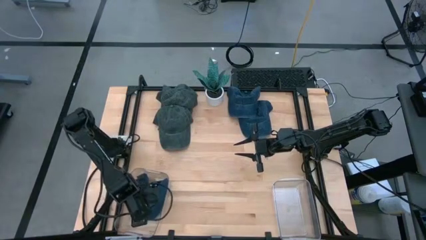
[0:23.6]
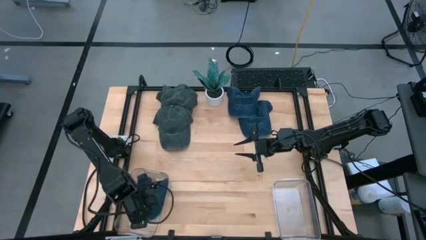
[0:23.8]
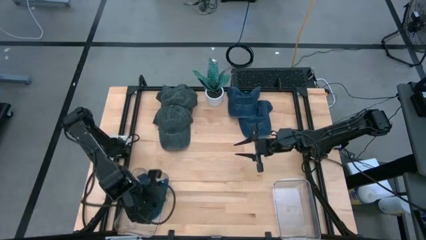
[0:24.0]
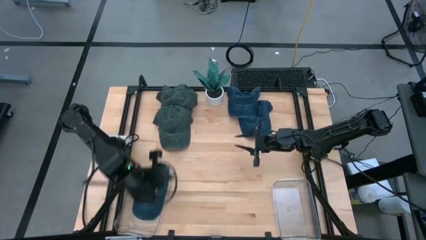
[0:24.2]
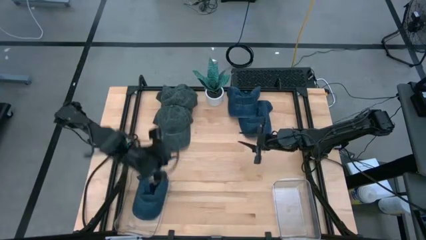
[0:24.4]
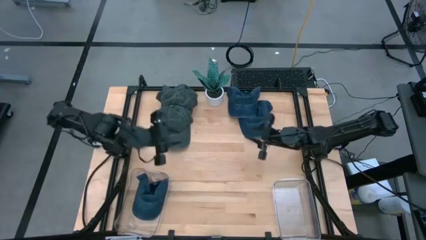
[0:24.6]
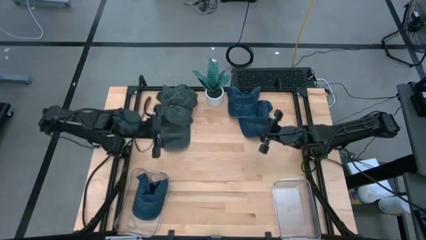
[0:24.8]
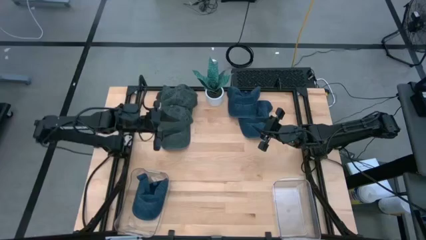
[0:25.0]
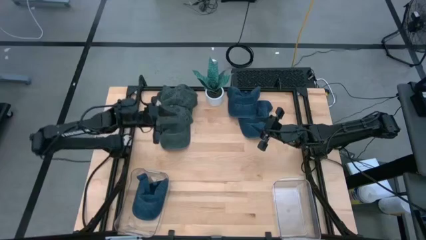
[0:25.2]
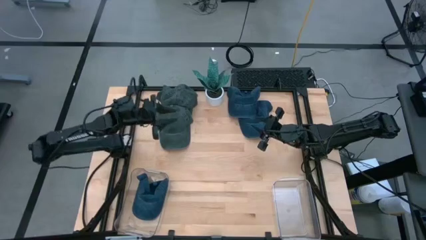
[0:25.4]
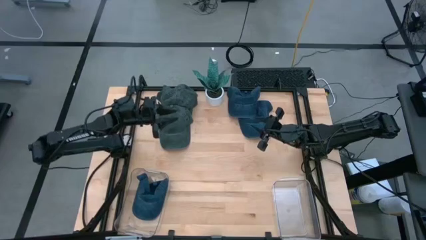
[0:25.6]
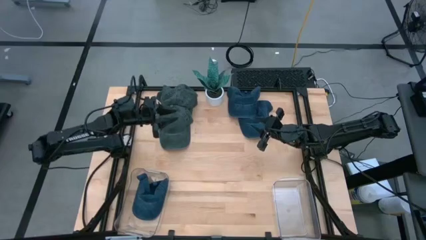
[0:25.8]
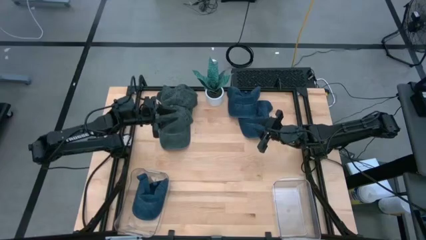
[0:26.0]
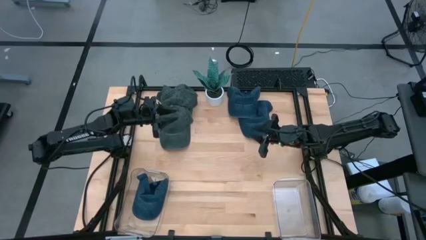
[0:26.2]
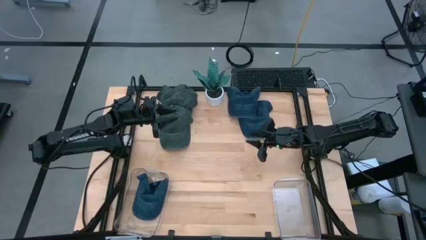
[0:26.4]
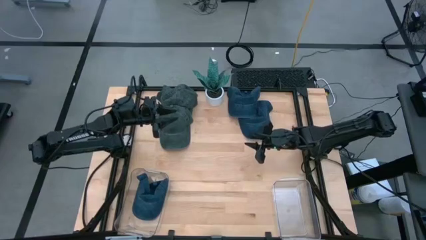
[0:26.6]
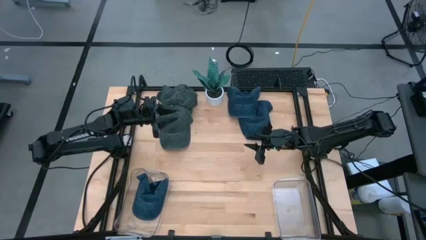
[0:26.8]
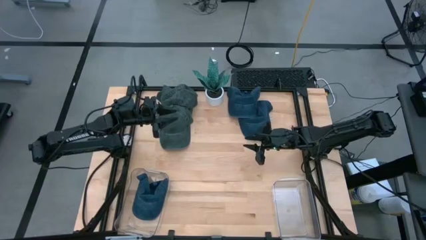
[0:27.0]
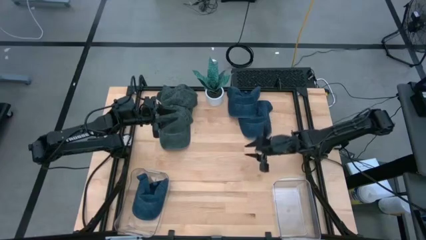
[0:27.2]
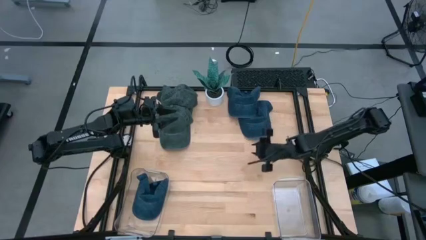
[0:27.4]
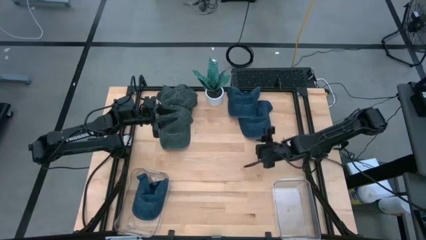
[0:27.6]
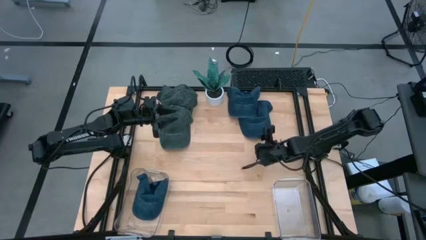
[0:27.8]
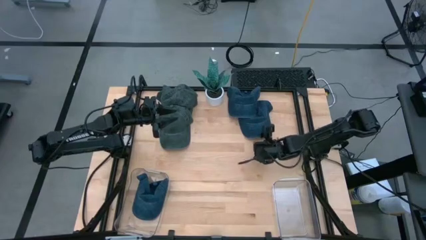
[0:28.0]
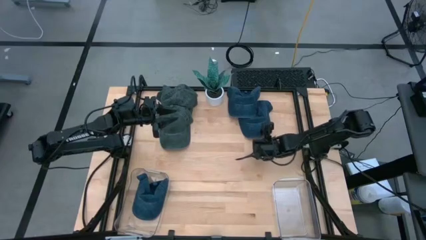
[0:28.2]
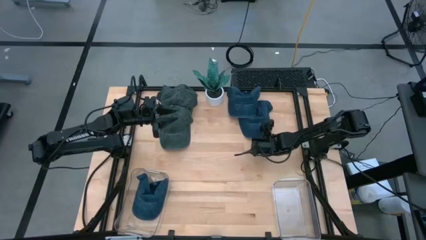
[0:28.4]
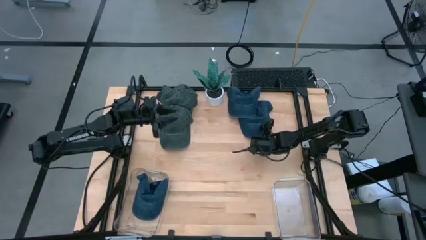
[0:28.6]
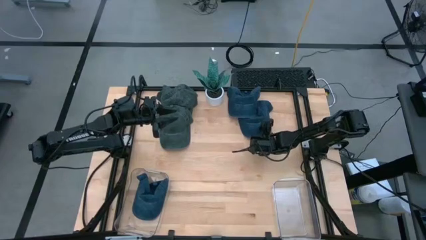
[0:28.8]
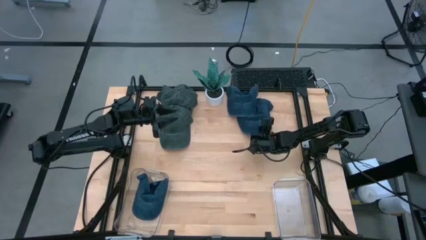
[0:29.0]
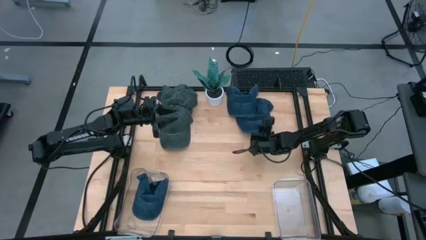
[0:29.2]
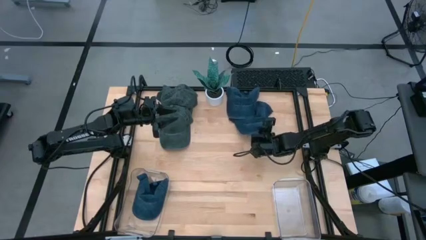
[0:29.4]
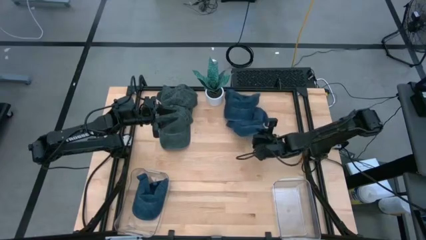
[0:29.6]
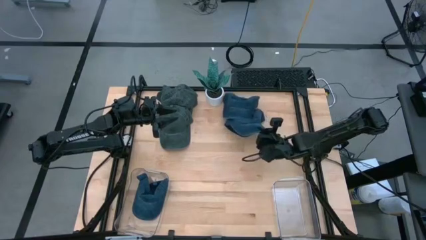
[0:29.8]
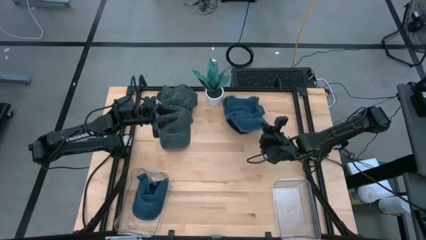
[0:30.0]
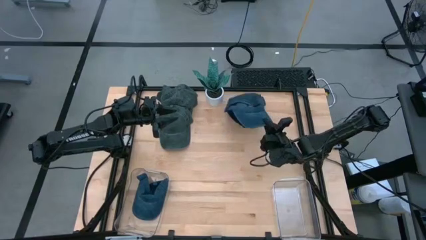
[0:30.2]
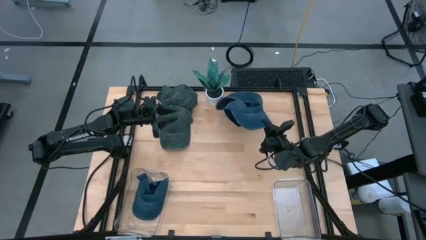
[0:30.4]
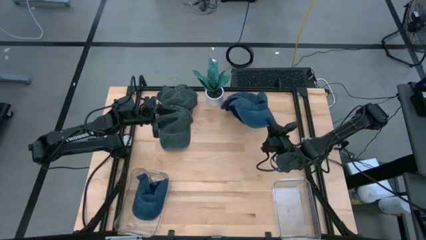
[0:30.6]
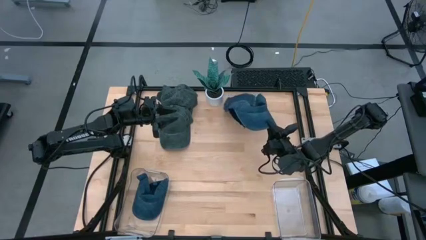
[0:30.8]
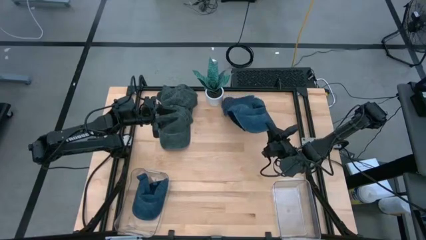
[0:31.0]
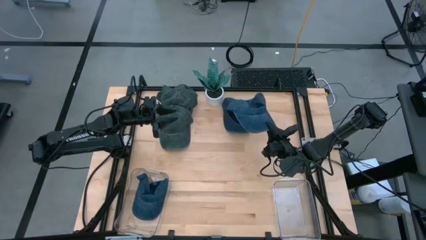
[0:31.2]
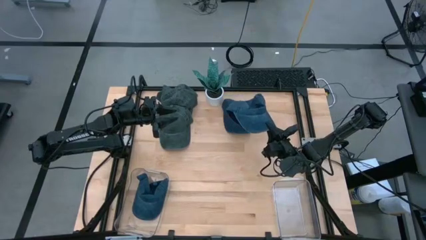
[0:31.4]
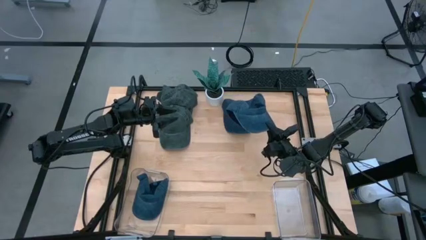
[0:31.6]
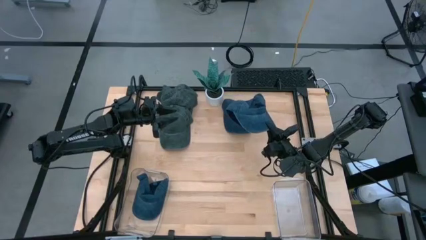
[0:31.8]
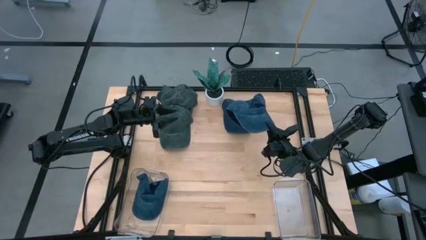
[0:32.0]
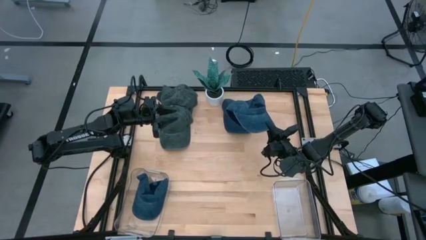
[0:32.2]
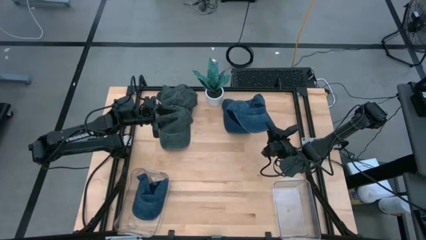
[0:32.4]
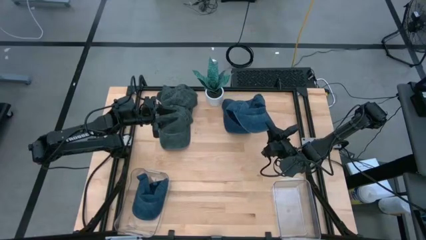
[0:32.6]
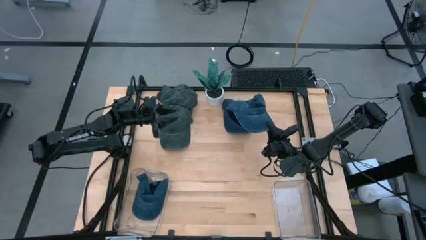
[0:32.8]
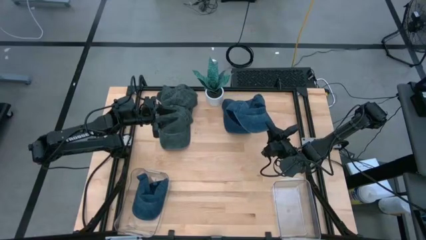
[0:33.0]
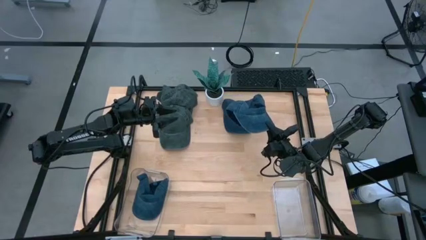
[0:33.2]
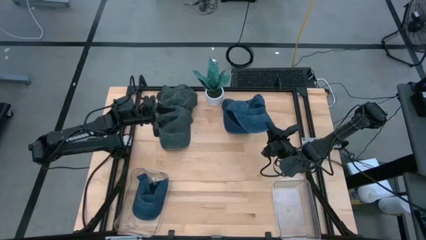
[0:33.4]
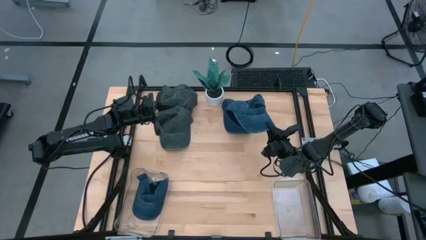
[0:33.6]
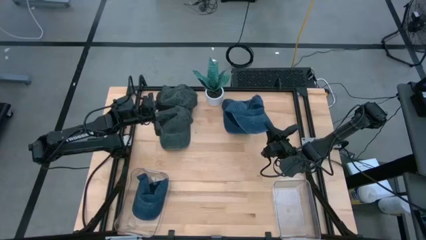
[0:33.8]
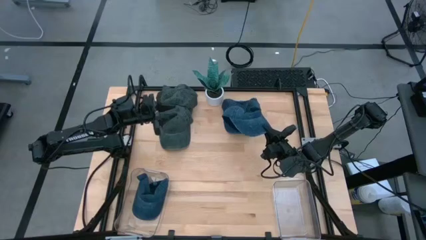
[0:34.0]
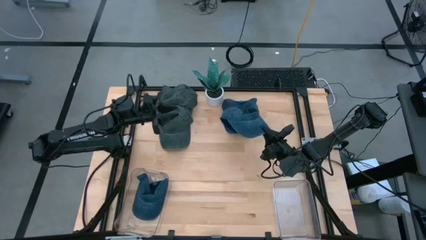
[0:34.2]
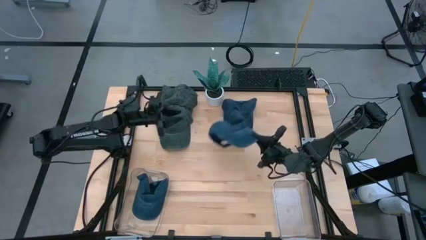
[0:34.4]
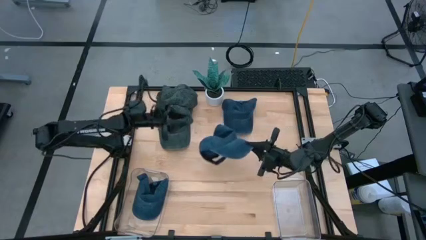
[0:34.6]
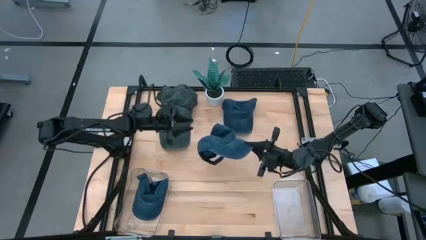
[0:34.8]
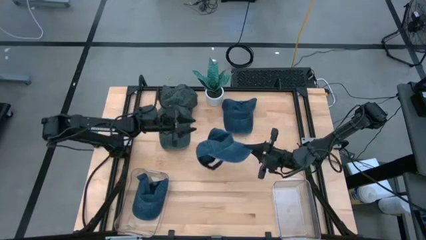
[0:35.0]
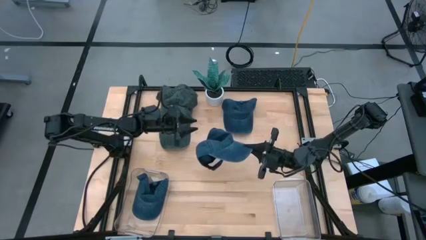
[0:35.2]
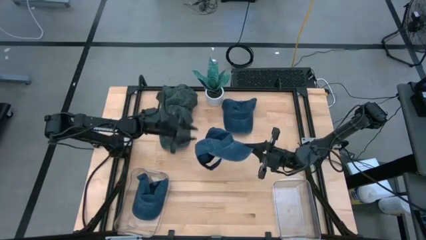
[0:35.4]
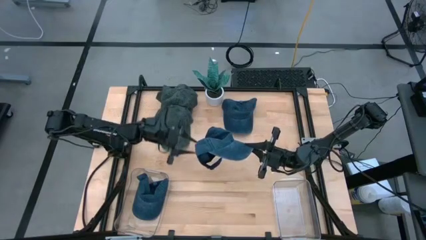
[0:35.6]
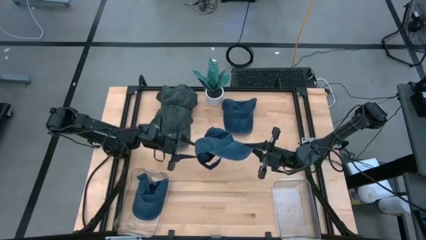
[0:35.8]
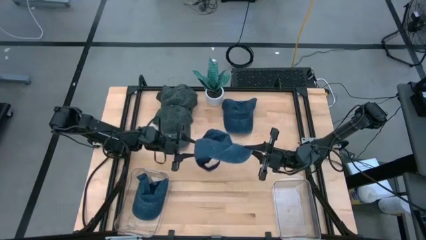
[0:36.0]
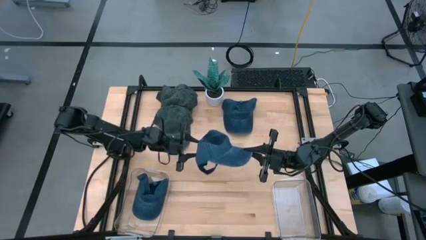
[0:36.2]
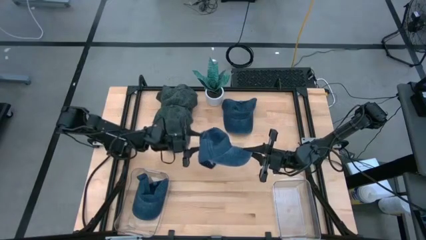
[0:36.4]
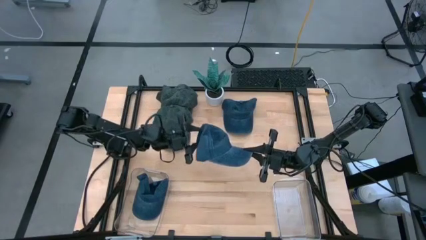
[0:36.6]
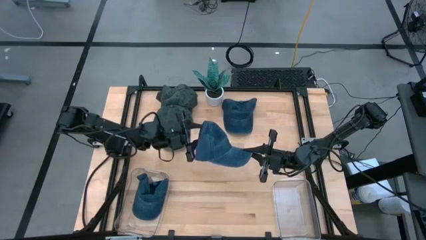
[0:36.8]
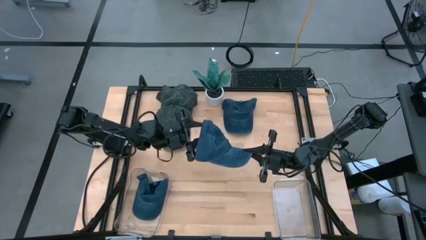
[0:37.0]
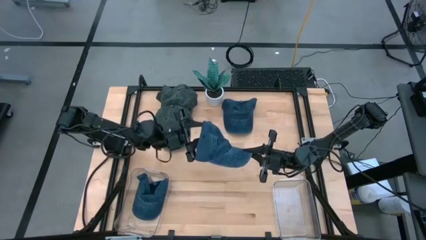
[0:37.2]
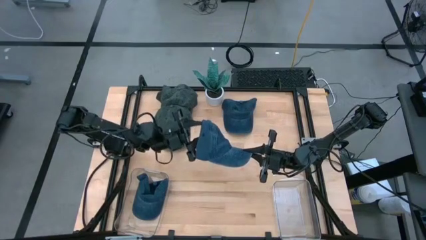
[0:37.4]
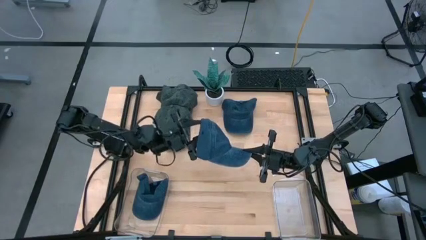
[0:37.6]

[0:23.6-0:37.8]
Task: Pick & Place hat
Put the bottom blue cap into the left transparent bin
